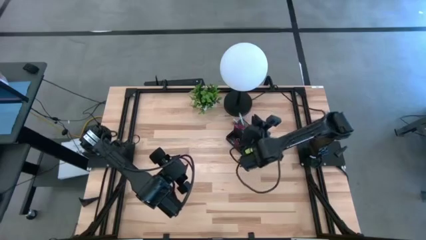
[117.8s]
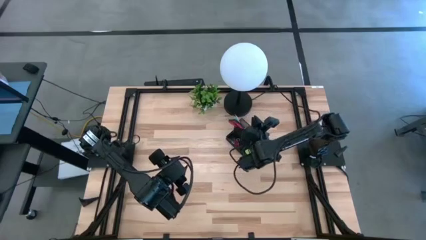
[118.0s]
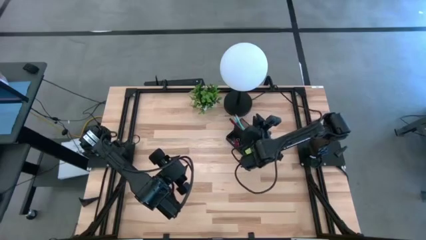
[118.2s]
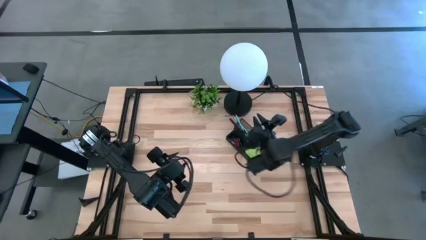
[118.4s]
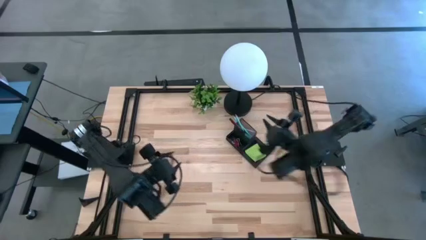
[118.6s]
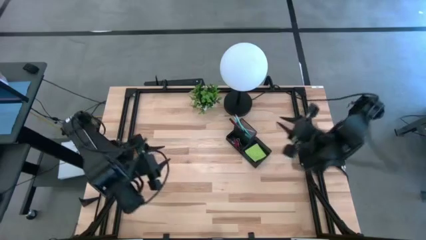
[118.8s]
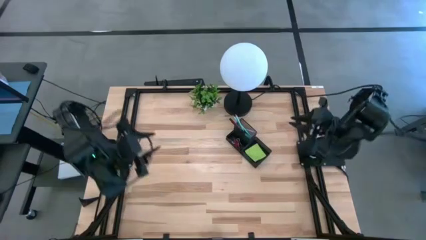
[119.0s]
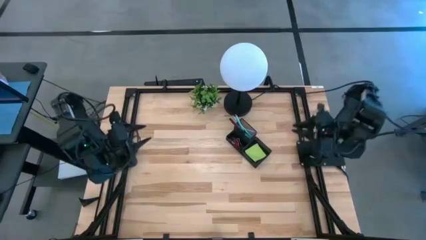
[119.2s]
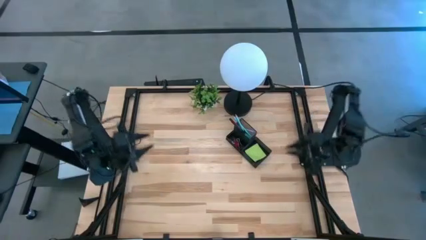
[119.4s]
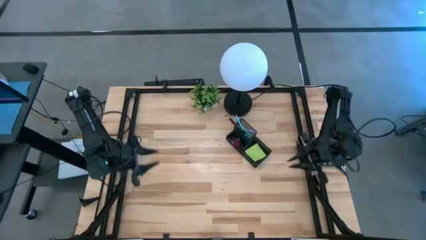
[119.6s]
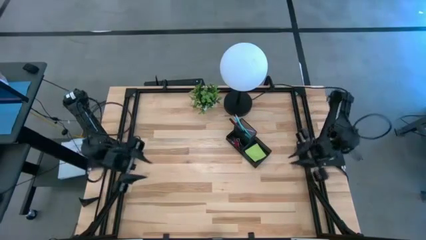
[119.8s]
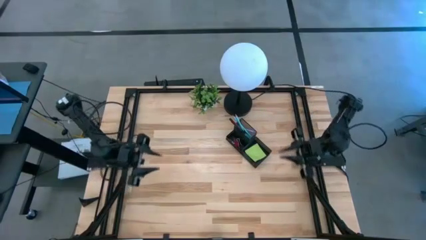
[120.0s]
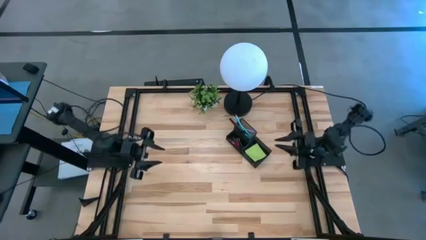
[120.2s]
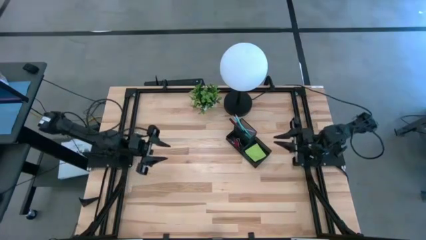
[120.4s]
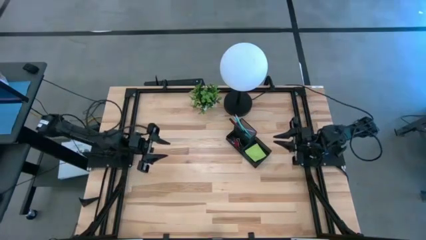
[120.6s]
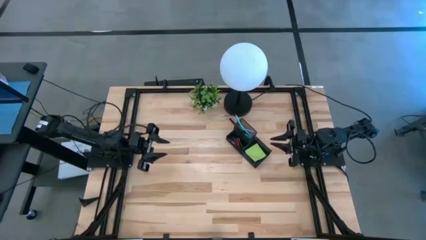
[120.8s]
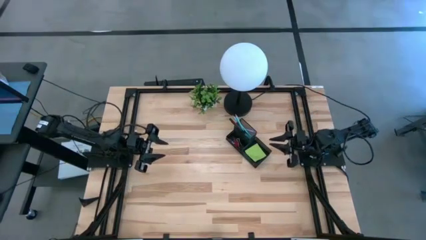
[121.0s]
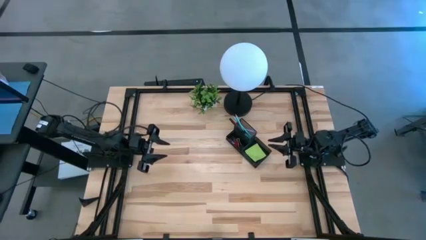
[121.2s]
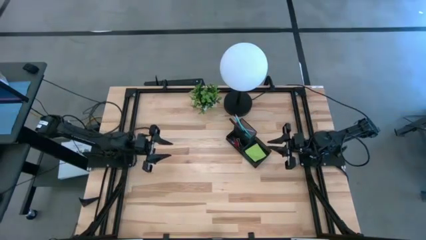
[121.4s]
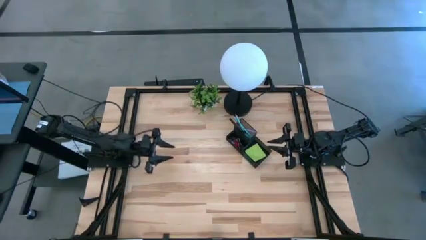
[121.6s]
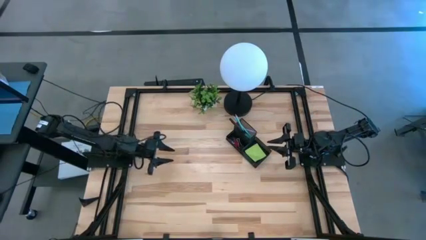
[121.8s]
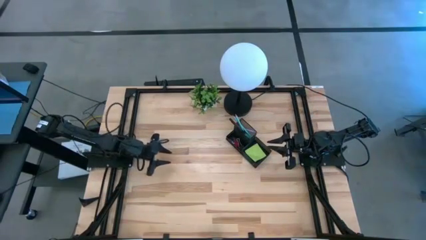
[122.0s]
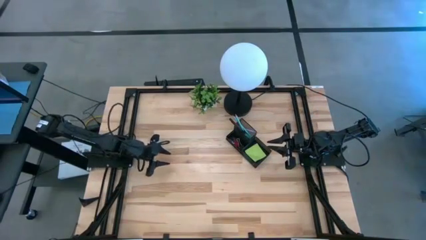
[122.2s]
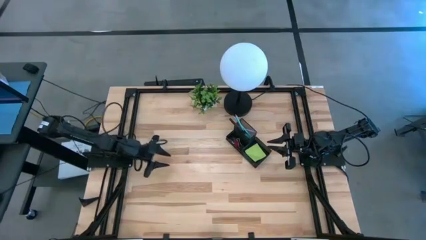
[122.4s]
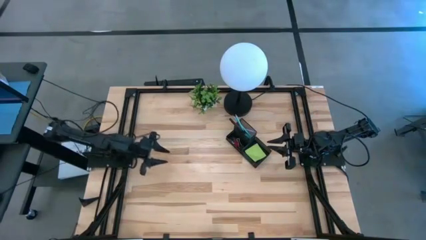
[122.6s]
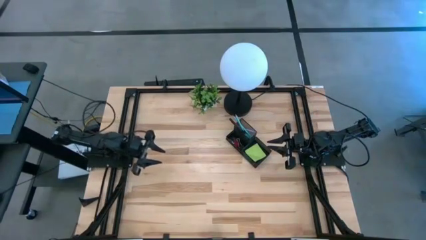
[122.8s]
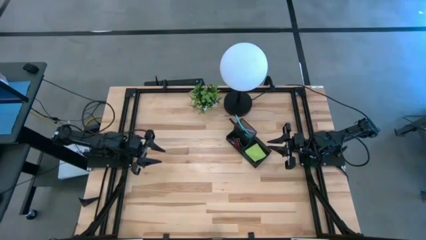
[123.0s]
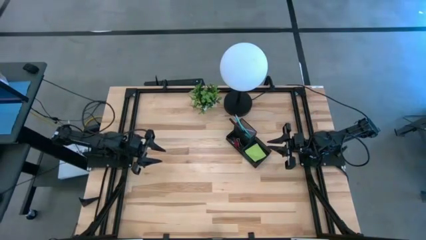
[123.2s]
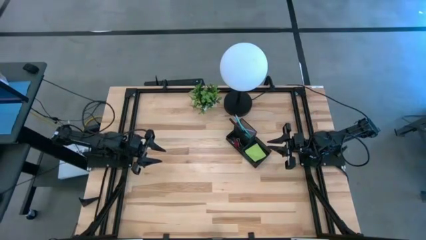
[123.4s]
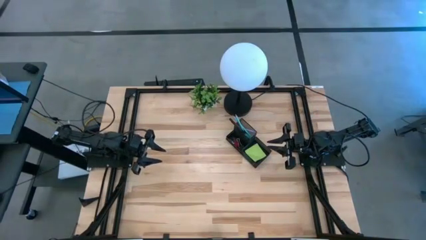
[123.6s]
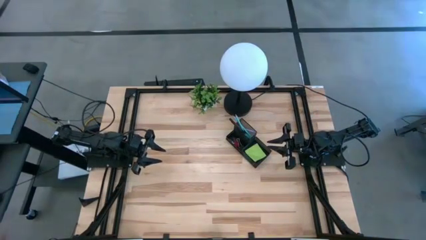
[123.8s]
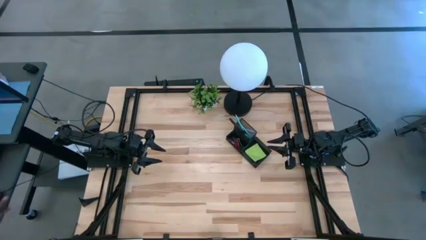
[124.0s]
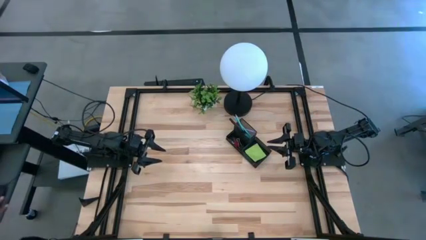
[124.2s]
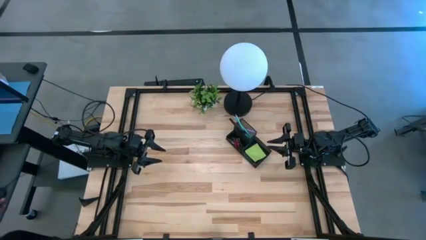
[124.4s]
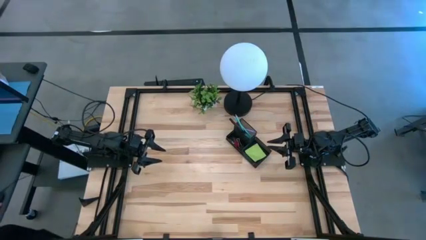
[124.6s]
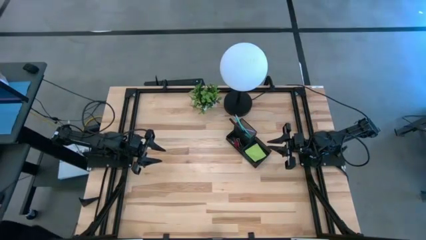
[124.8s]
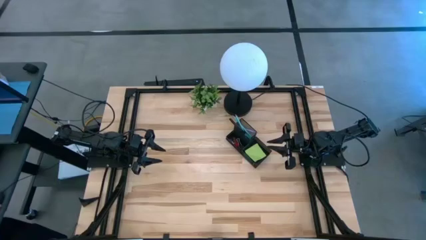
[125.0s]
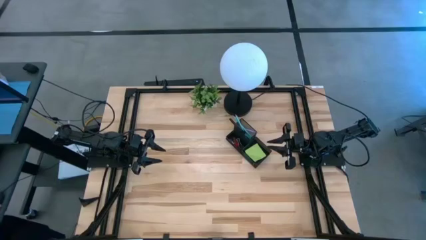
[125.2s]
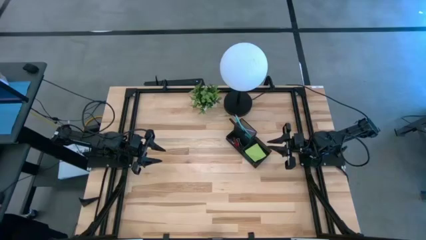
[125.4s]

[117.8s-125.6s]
Task: Pick and place office supplies into organizer
Return to Home Position

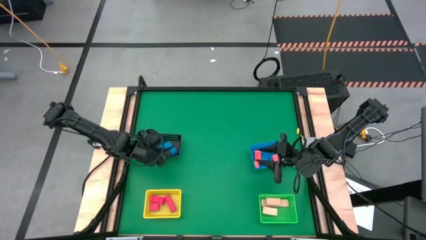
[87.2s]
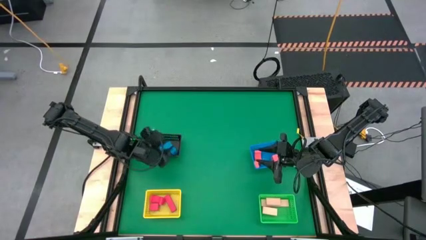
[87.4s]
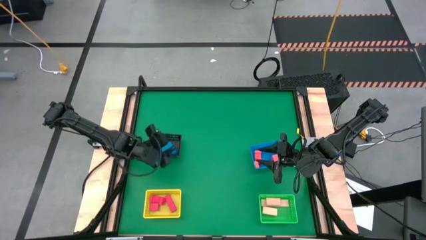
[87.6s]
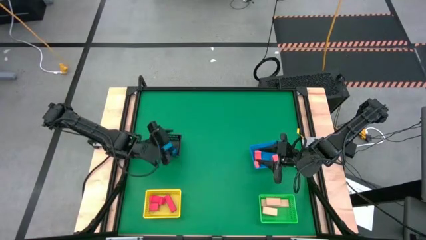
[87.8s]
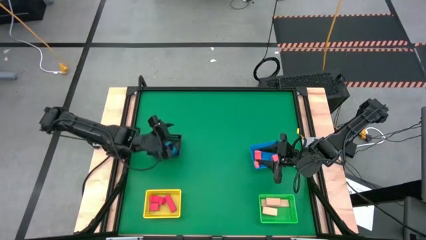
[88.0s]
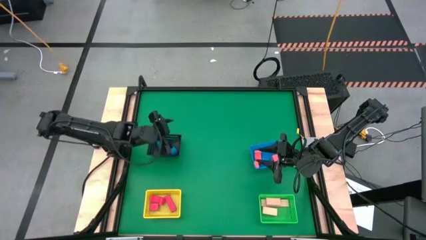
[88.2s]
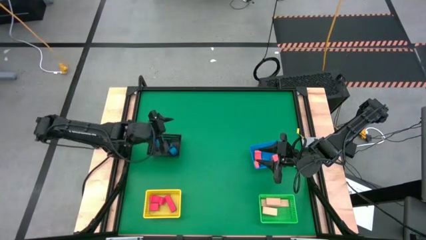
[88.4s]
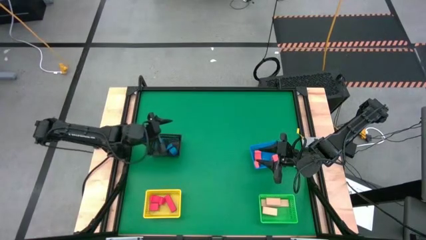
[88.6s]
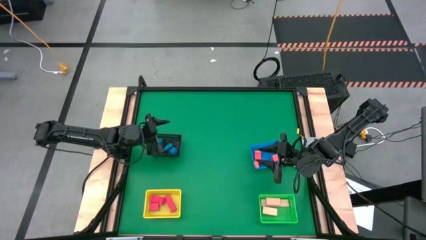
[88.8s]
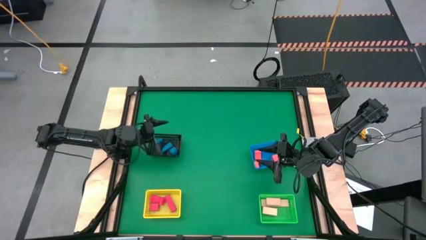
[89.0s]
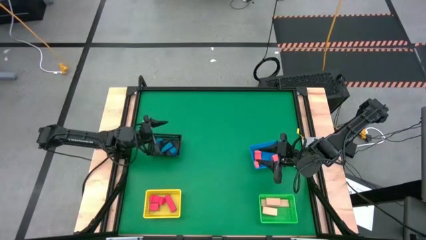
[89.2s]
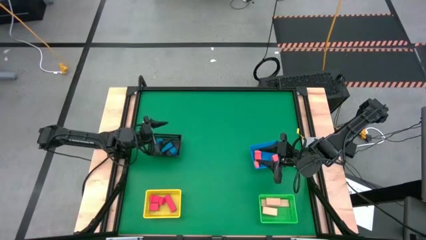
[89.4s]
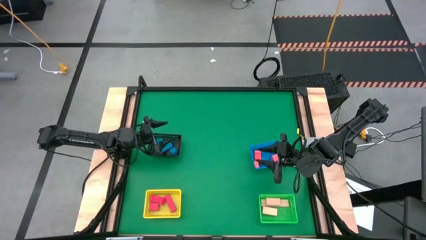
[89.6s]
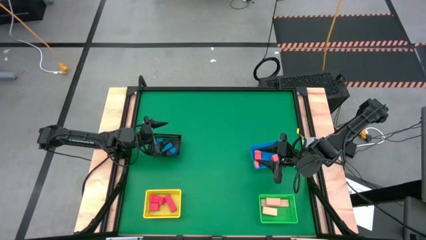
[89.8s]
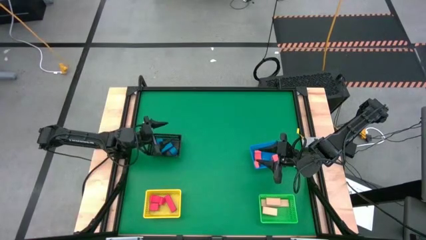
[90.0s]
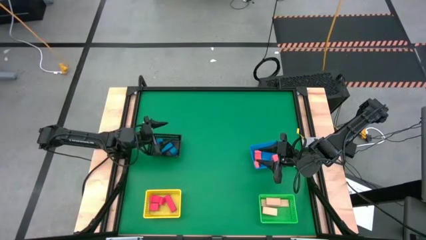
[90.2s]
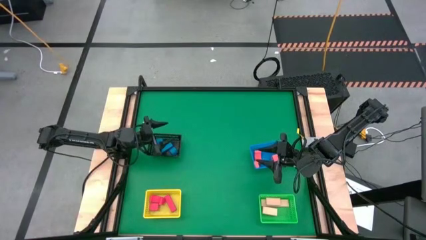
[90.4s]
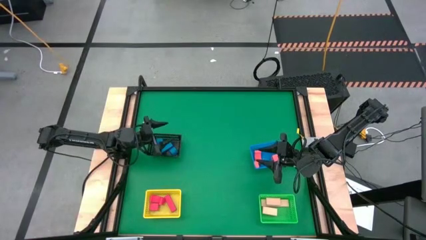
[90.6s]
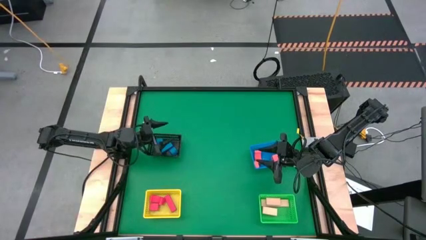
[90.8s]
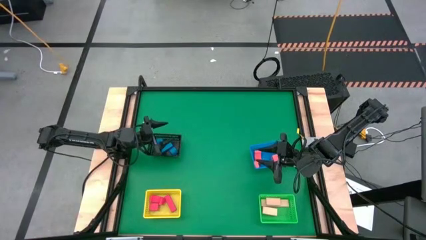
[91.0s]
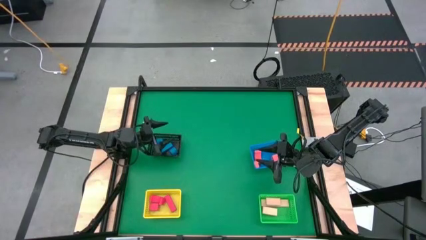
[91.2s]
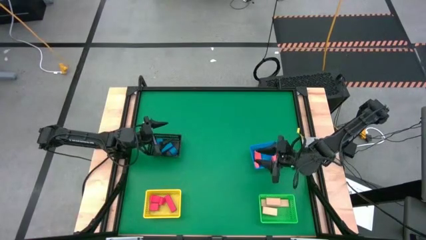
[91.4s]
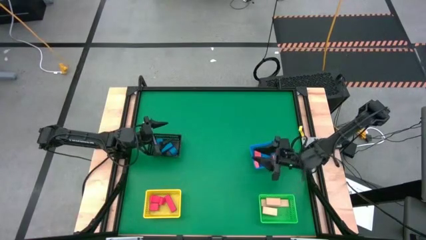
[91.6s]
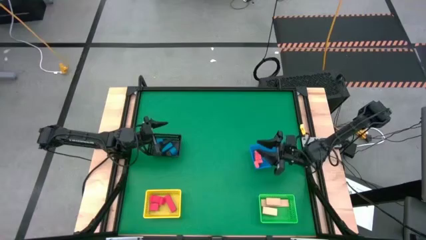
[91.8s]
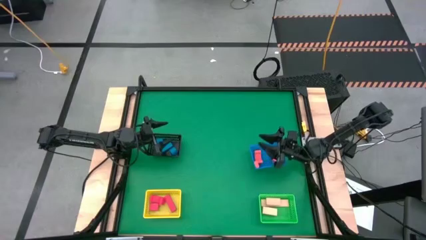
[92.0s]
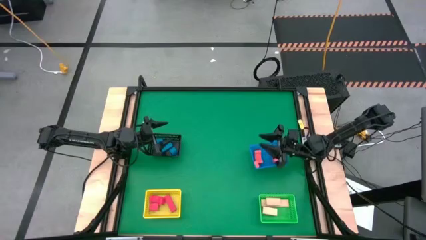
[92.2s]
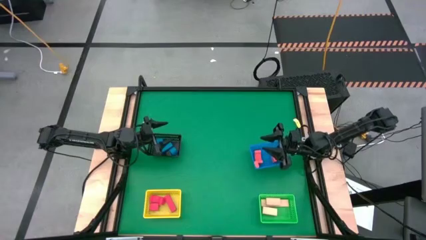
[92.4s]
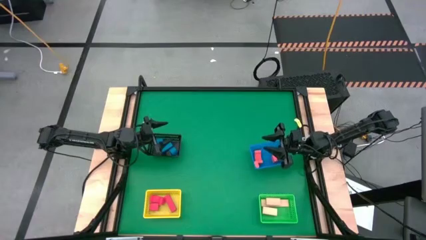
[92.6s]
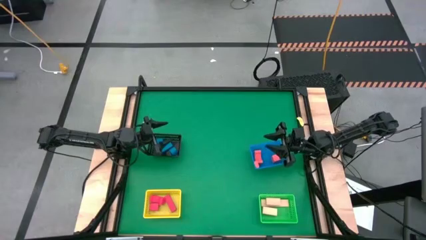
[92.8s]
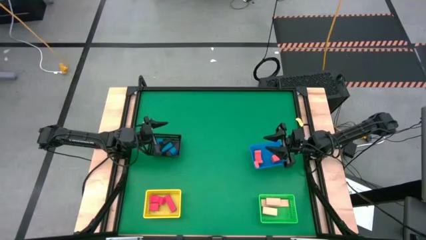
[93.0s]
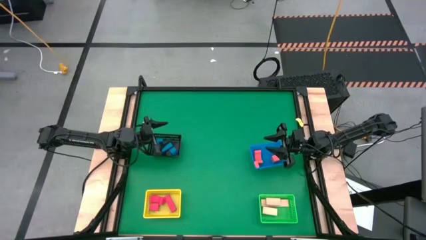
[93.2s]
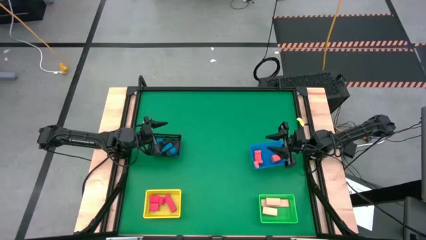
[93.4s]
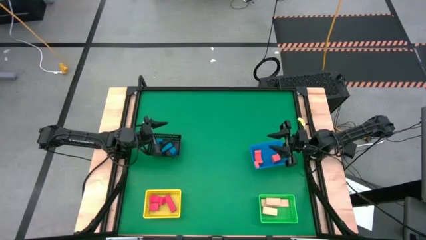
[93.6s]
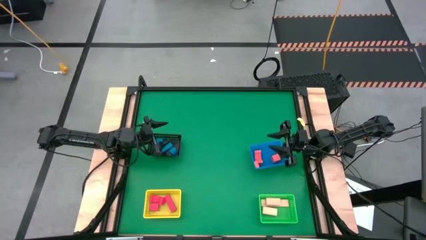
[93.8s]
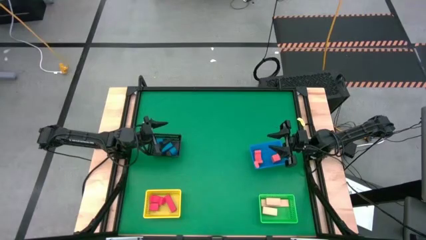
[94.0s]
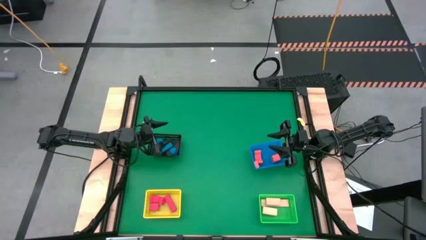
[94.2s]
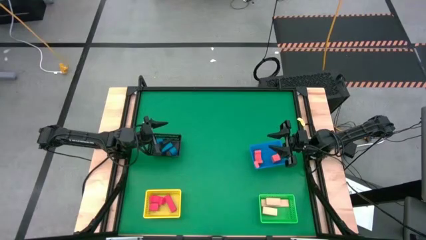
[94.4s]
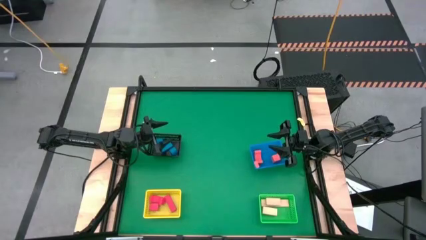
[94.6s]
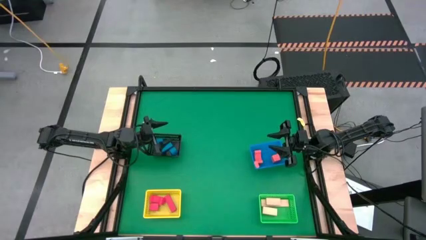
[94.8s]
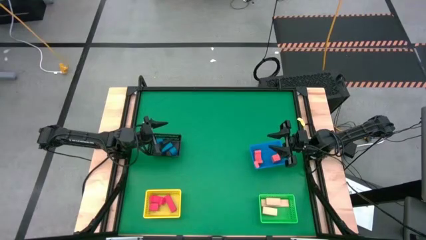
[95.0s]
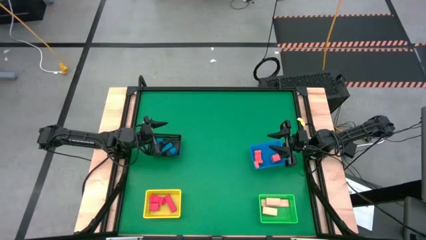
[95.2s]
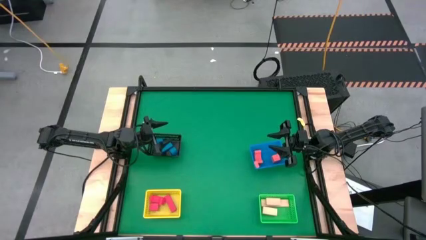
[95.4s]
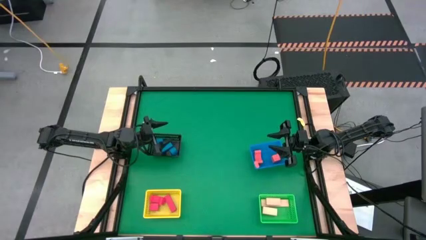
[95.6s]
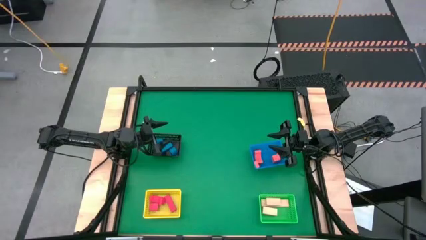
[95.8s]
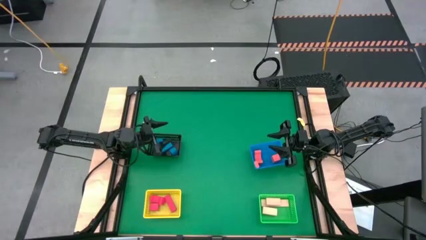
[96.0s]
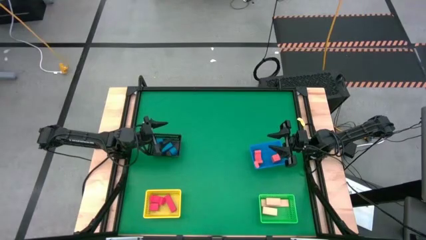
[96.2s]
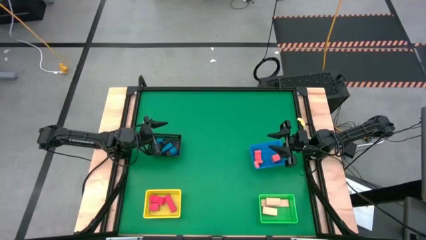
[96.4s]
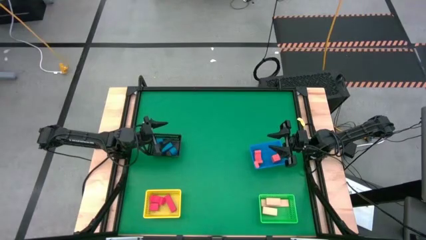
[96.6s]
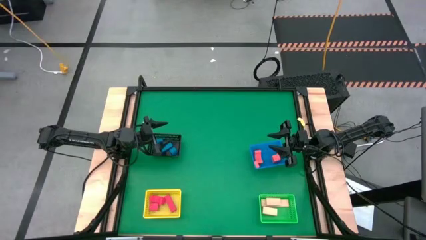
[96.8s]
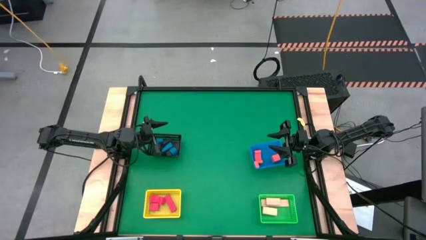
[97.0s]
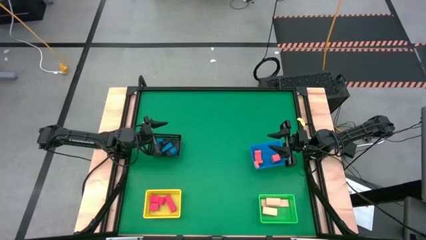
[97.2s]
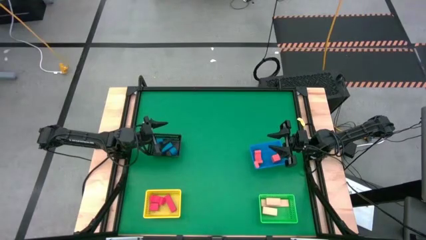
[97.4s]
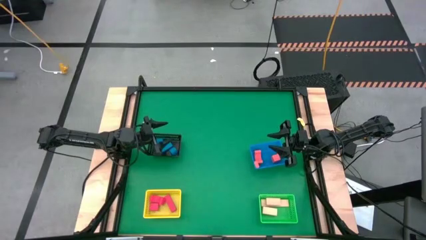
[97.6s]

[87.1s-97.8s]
Task: Sort & place blocks by color
Return to Home Position
